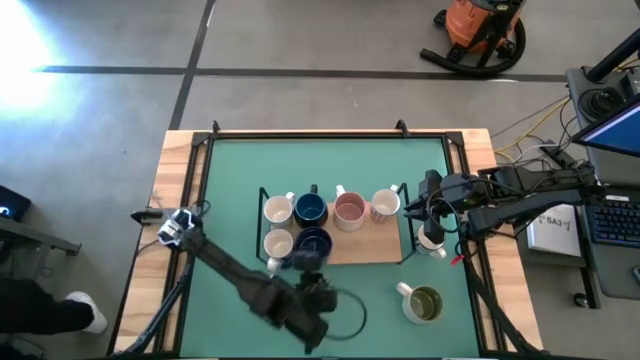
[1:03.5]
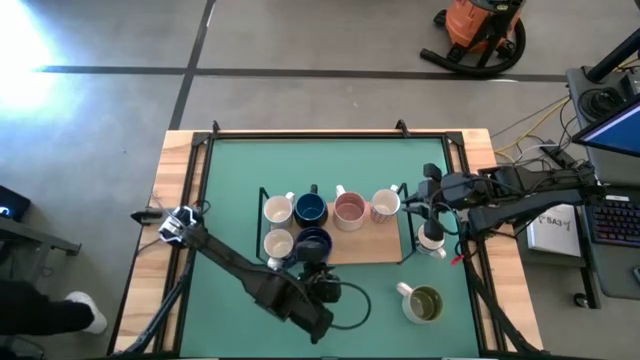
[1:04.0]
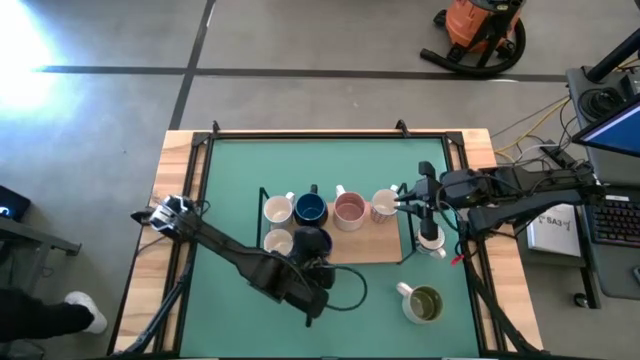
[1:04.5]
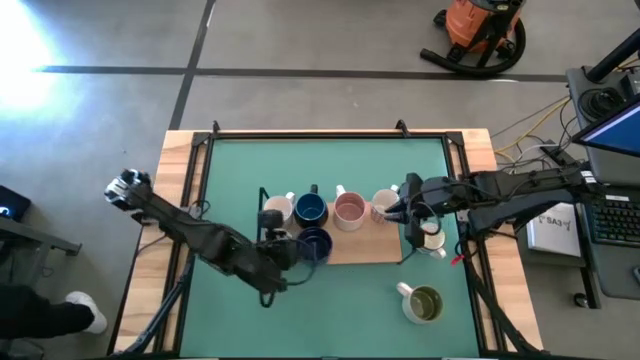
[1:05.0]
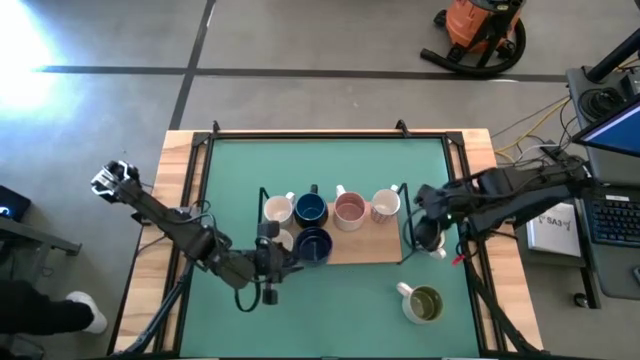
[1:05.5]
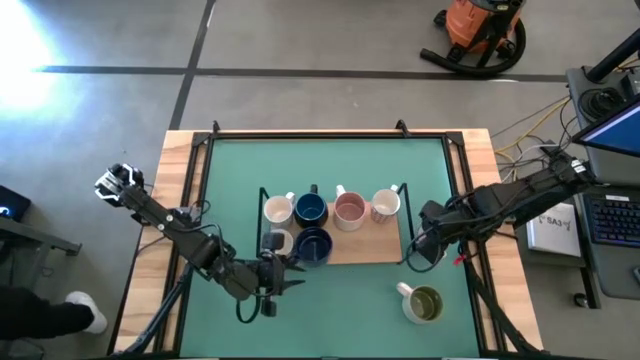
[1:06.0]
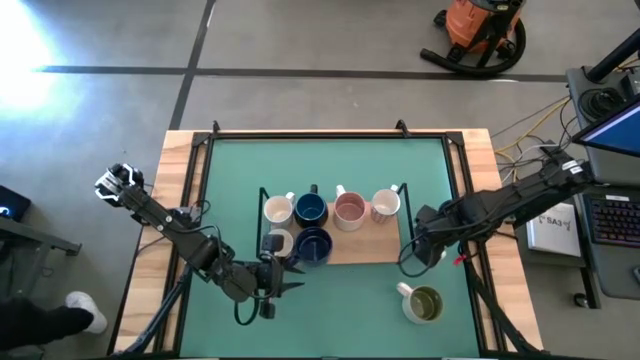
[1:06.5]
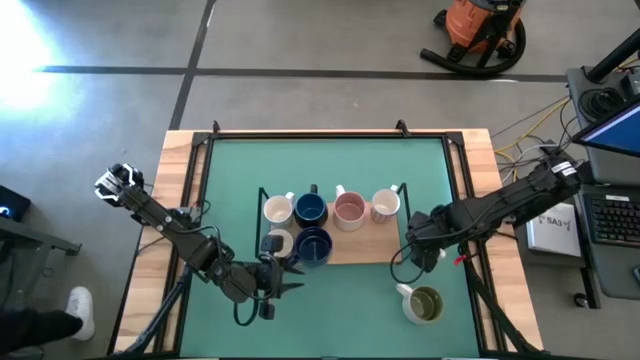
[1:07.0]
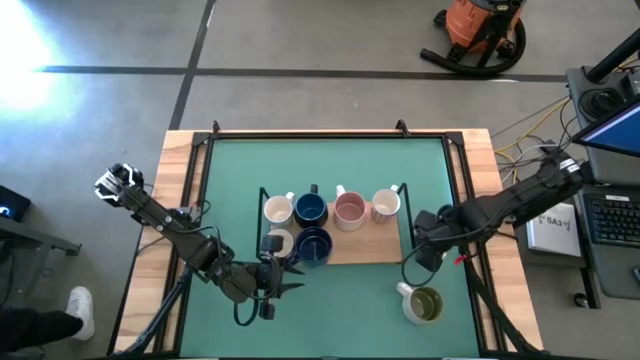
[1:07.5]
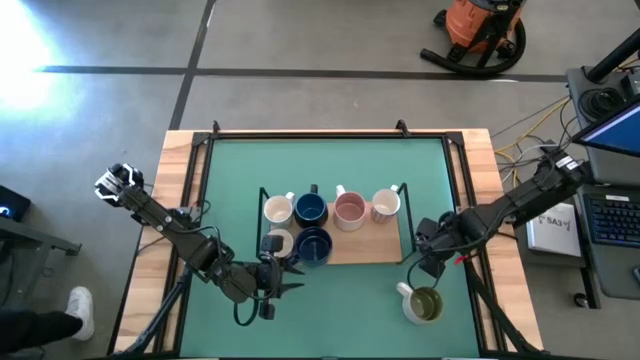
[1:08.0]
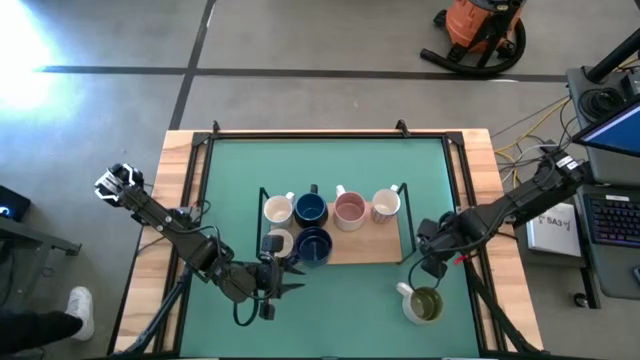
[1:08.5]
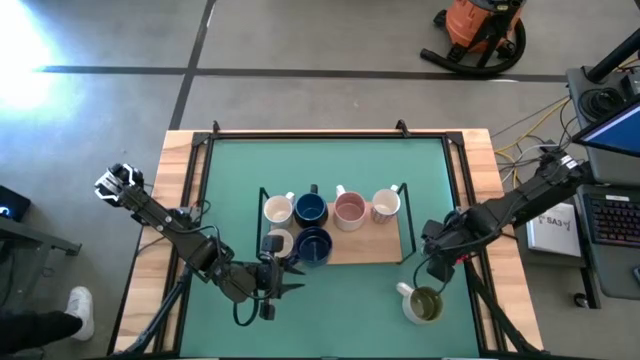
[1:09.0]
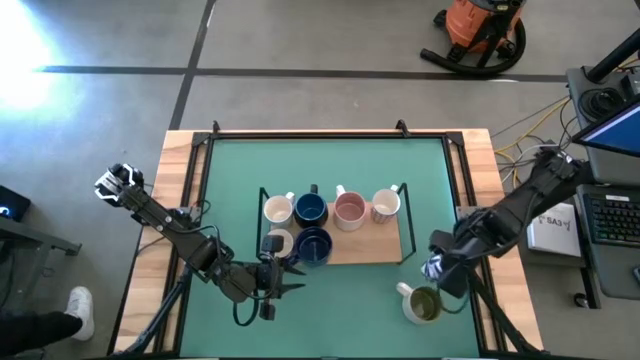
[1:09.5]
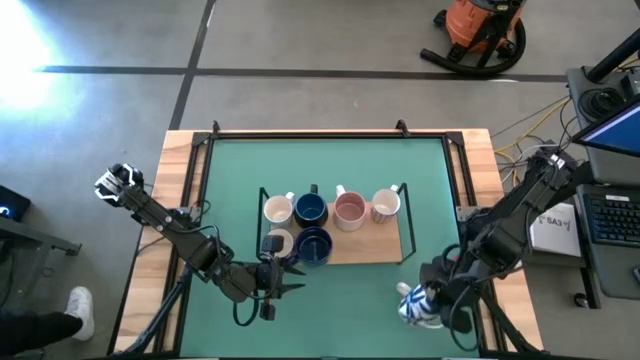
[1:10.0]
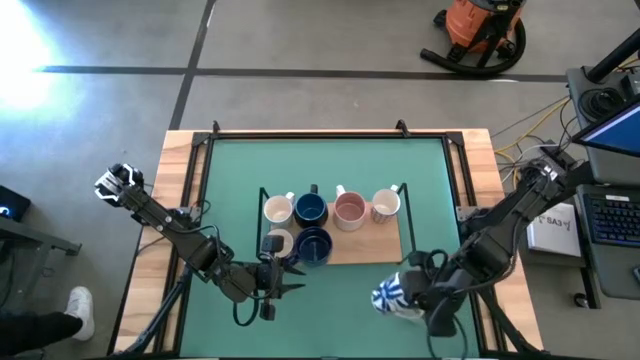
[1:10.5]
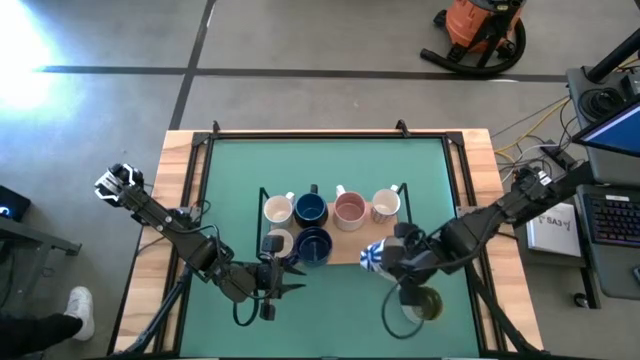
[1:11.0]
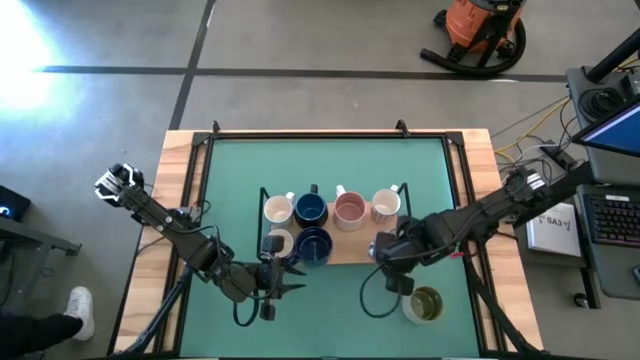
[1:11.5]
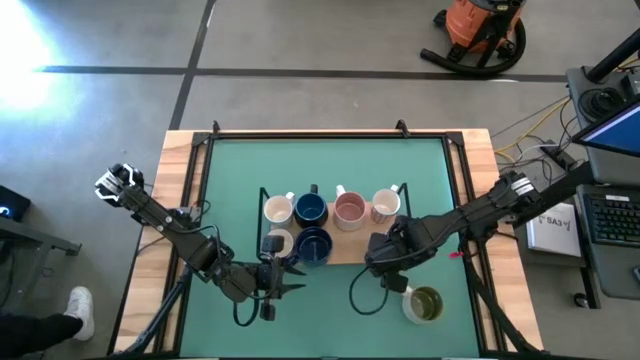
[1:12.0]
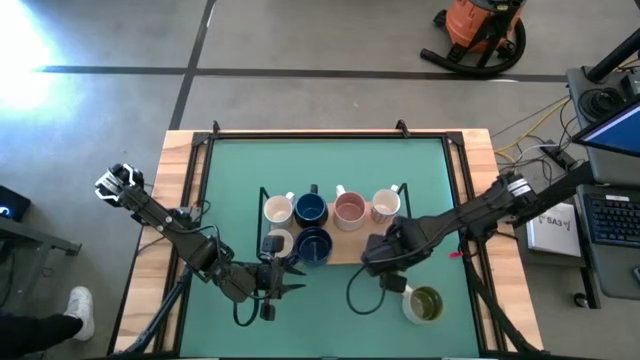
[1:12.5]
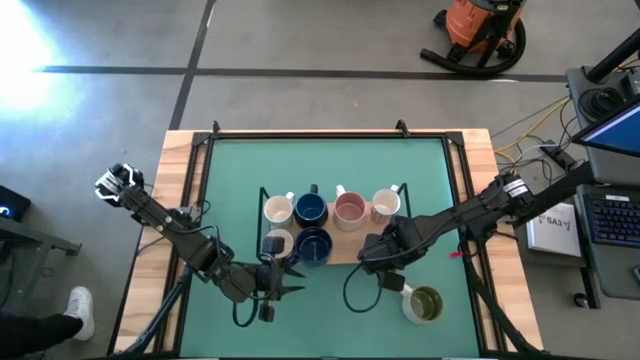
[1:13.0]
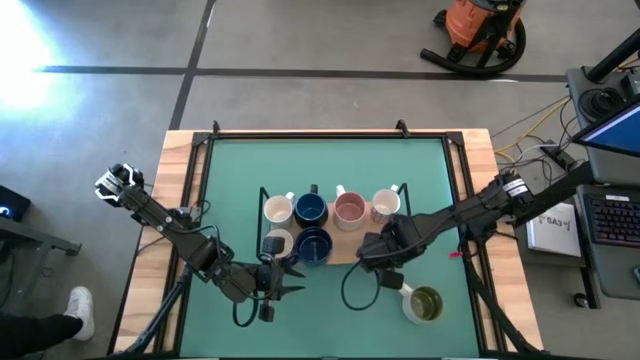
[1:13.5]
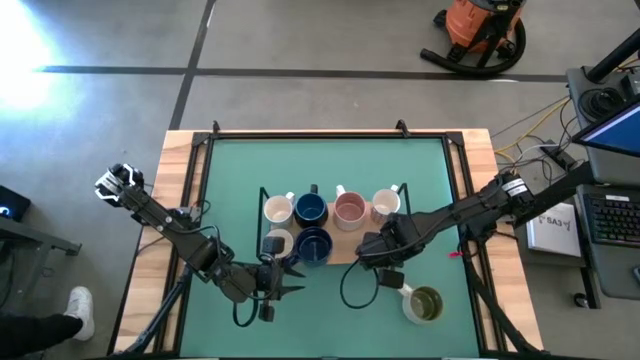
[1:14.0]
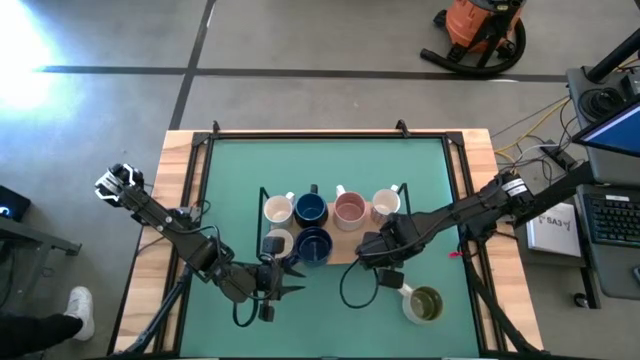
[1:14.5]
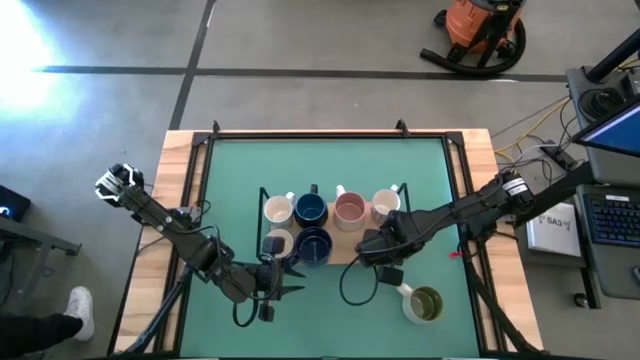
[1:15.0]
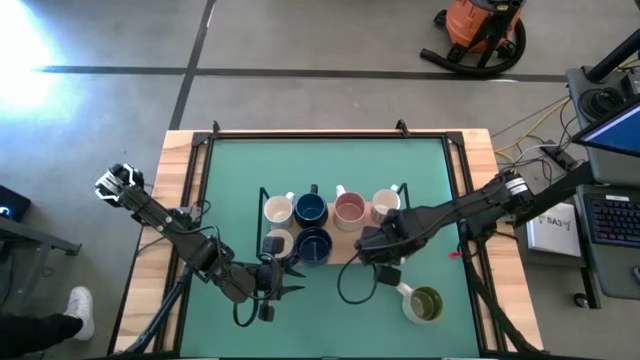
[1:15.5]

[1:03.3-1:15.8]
Task: Place coffee mugs
Put the blue patterned mug on the shelf

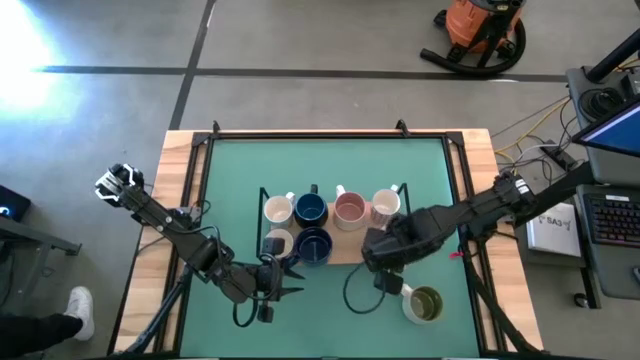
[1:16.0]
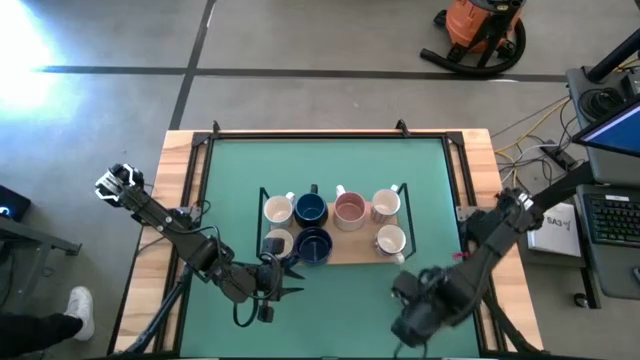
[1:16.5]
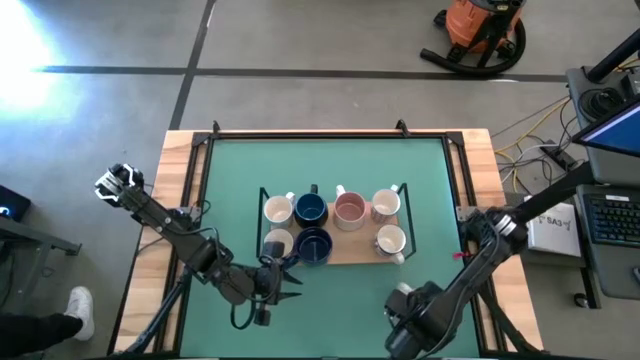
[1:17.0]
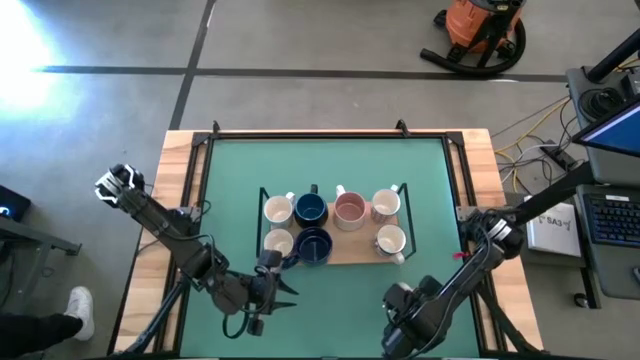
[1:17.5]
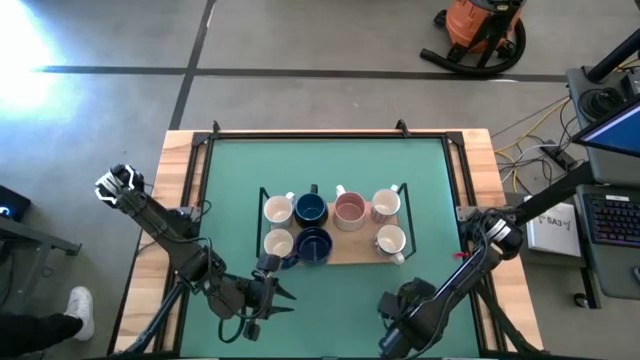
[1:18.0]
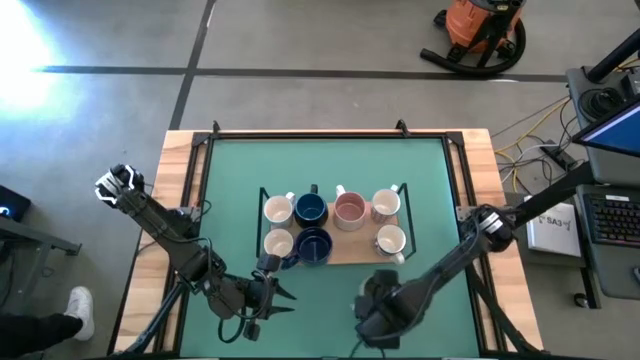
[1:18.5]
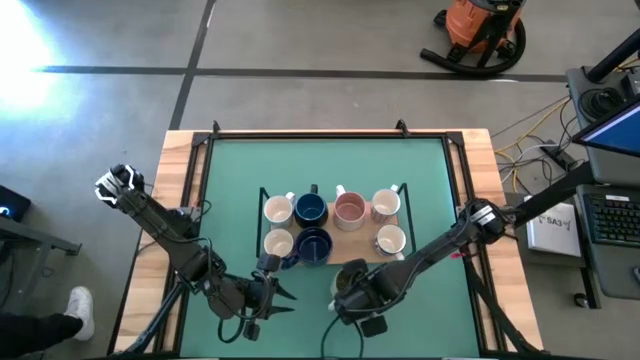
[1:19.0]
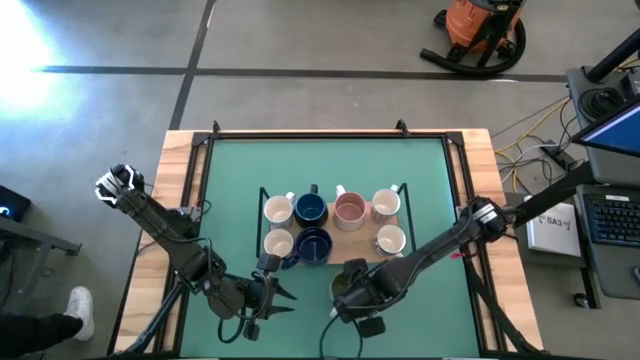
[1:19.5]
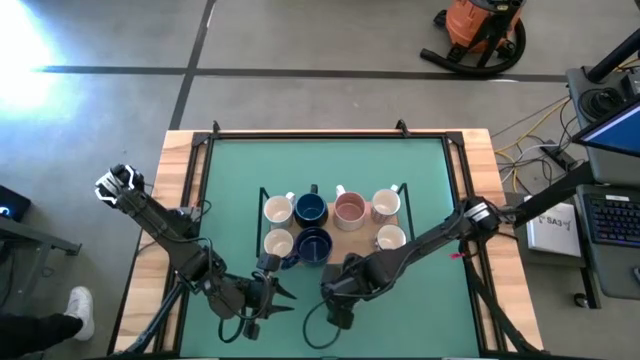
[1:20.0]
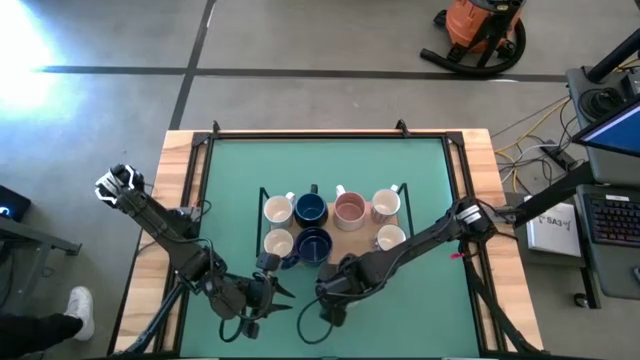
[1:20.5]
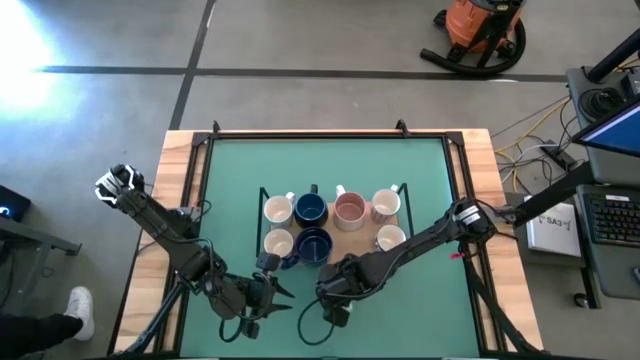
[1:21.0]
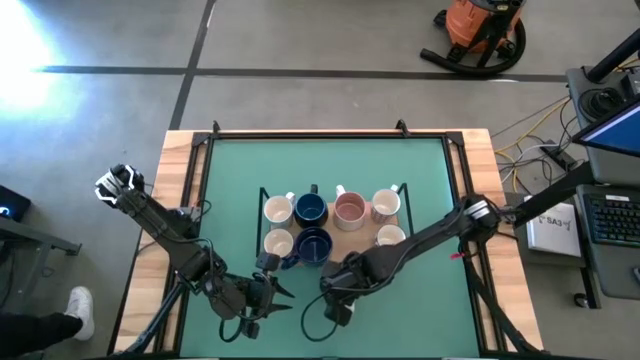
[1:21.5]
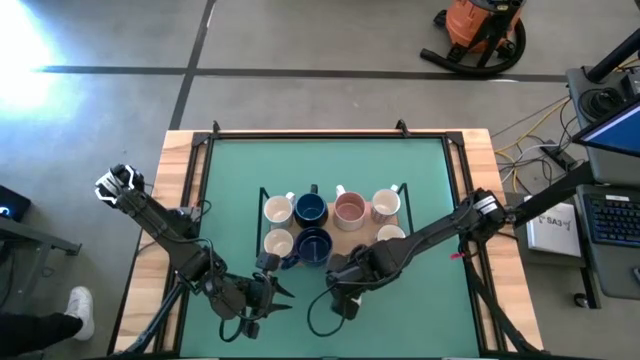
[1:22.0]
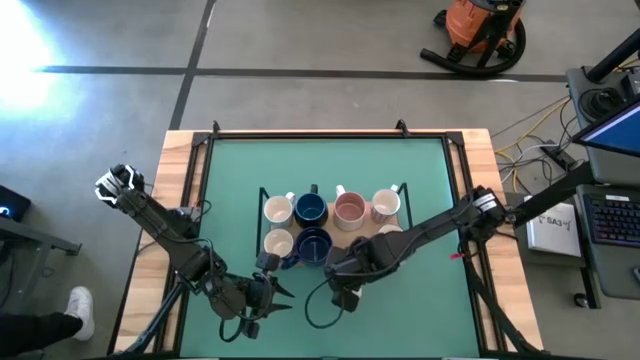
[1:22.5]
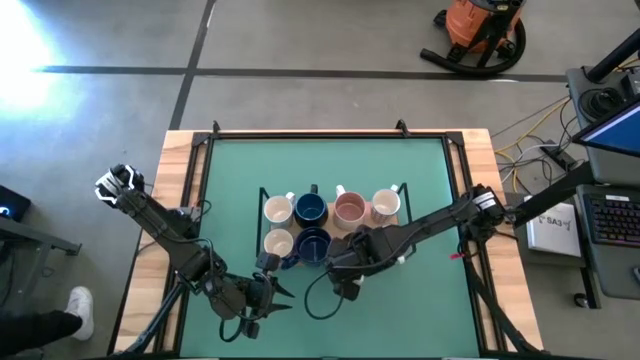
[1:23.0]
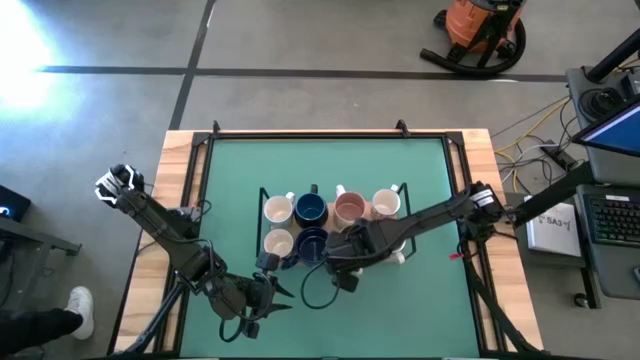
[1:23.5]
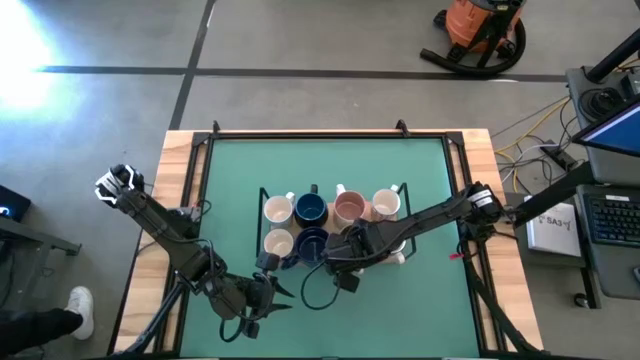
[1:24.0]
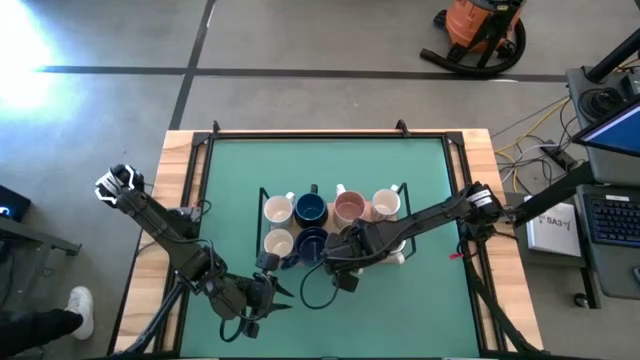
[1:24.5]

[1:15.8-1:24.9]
Put the green mug on the shelf
